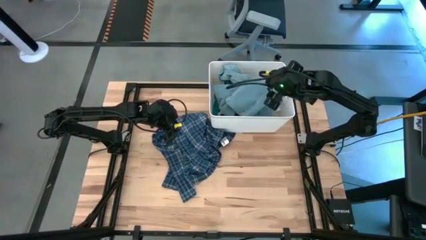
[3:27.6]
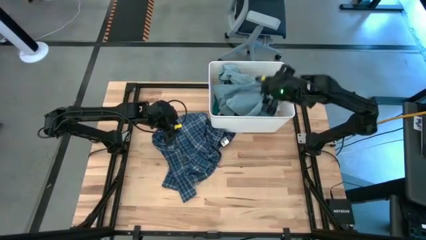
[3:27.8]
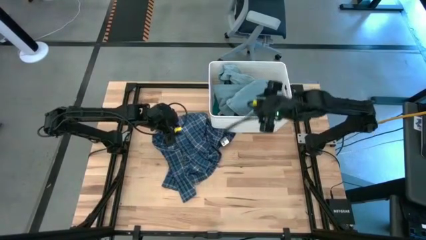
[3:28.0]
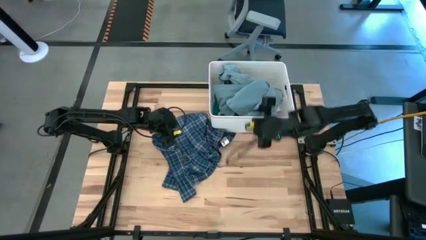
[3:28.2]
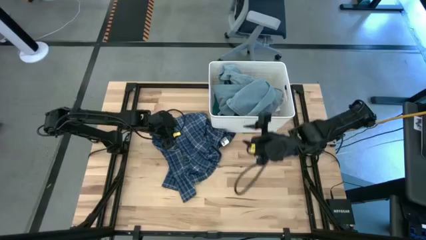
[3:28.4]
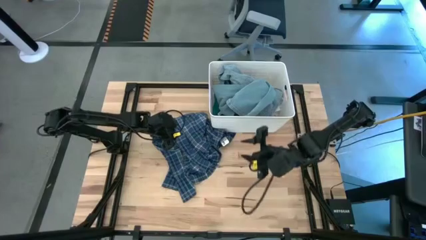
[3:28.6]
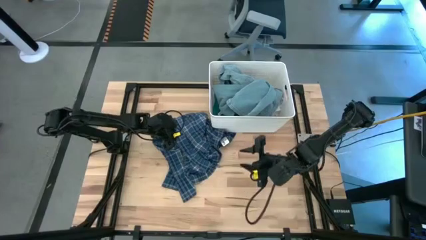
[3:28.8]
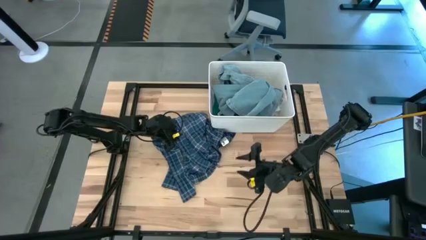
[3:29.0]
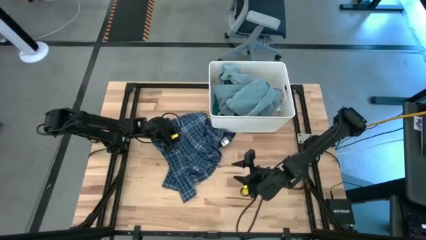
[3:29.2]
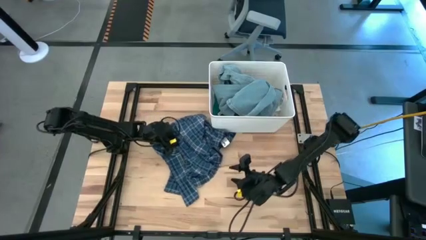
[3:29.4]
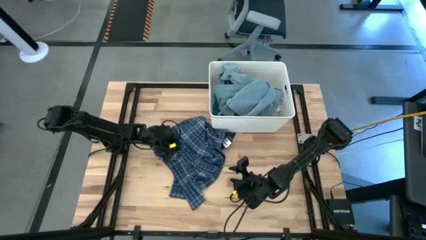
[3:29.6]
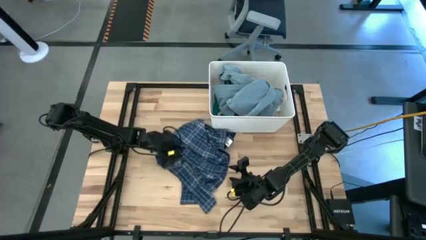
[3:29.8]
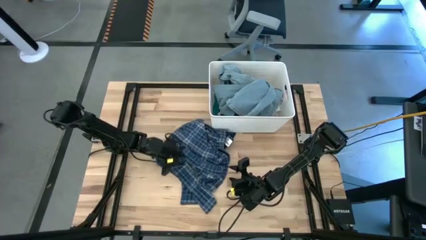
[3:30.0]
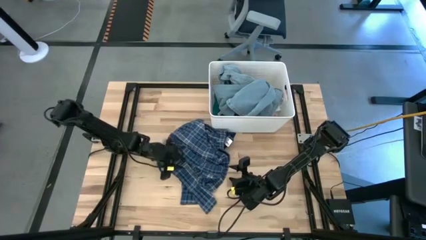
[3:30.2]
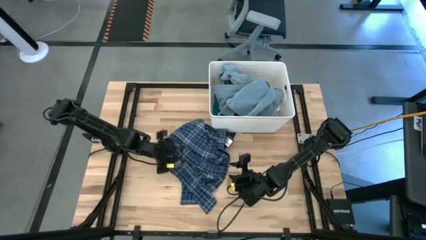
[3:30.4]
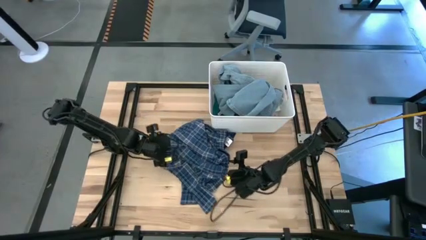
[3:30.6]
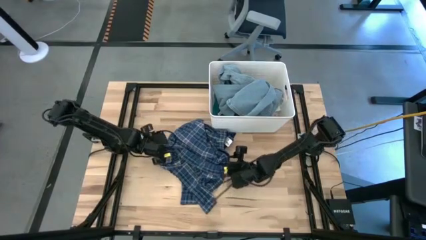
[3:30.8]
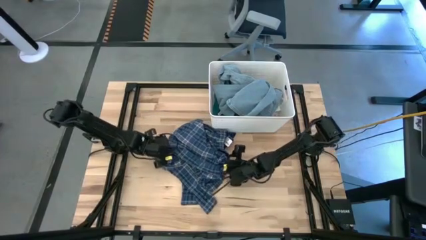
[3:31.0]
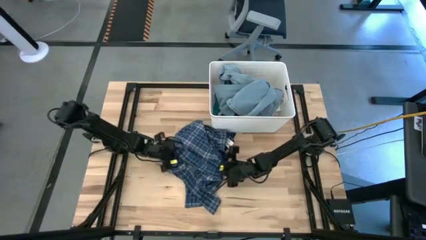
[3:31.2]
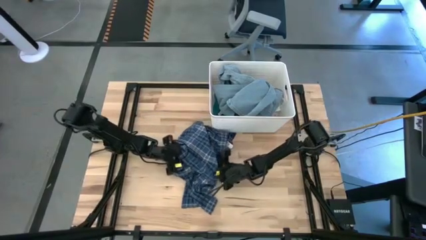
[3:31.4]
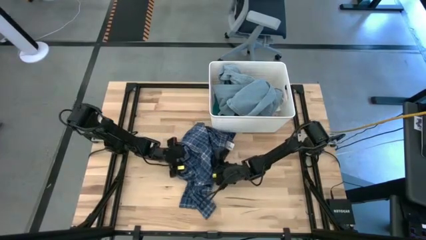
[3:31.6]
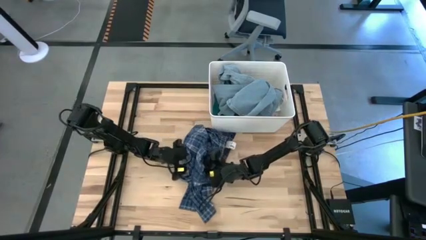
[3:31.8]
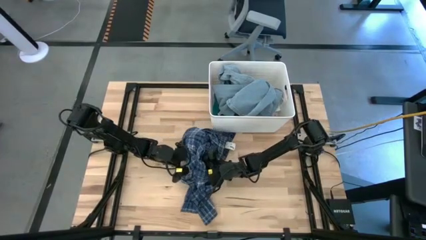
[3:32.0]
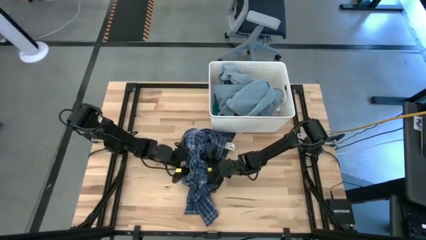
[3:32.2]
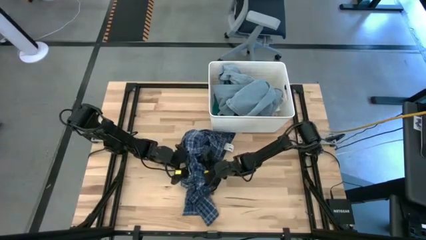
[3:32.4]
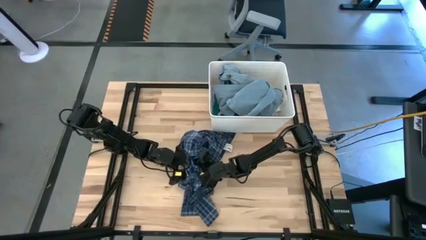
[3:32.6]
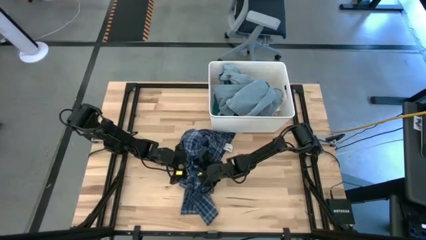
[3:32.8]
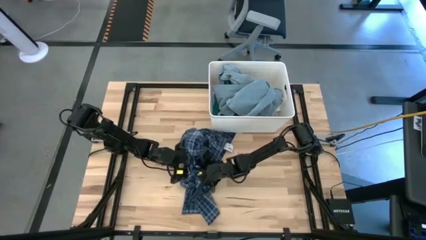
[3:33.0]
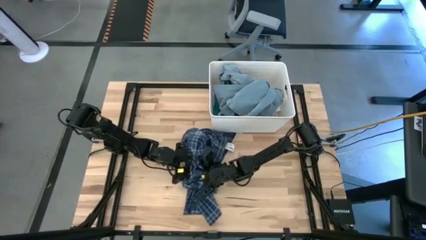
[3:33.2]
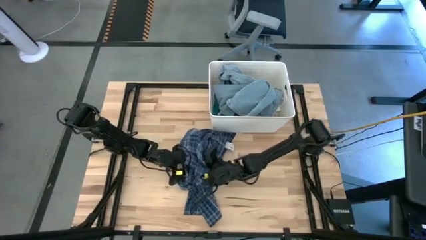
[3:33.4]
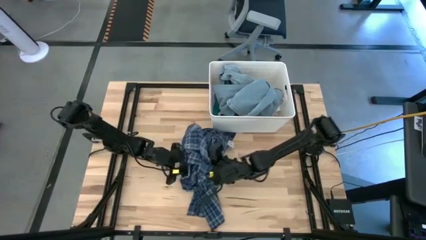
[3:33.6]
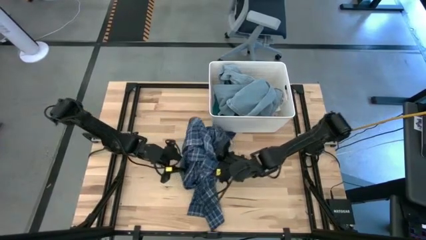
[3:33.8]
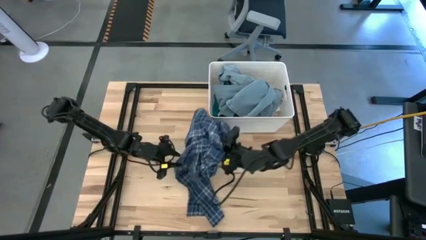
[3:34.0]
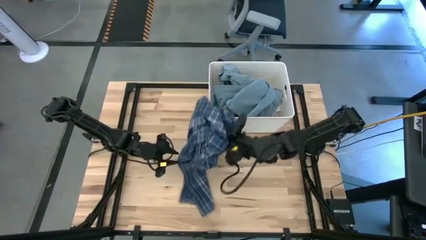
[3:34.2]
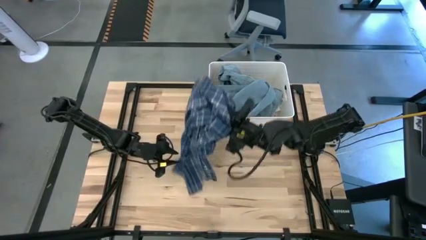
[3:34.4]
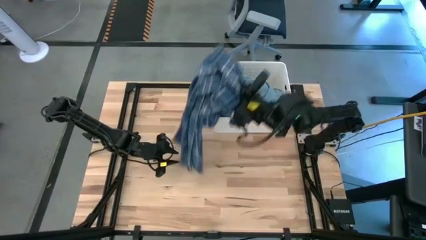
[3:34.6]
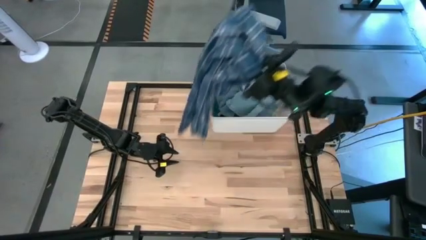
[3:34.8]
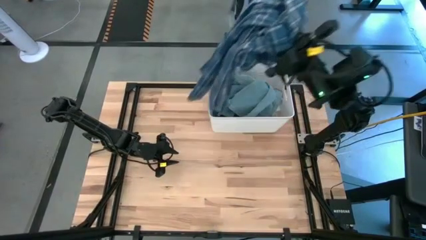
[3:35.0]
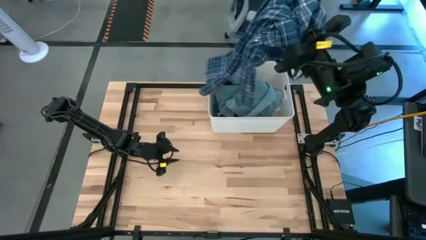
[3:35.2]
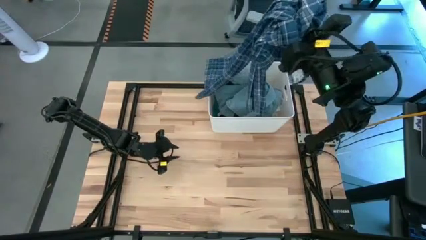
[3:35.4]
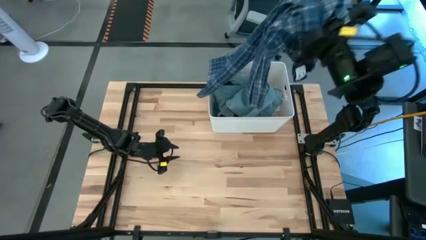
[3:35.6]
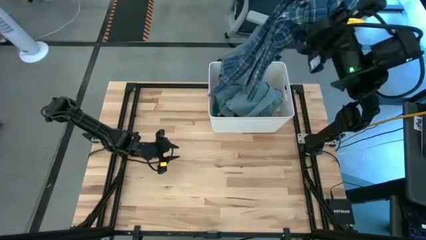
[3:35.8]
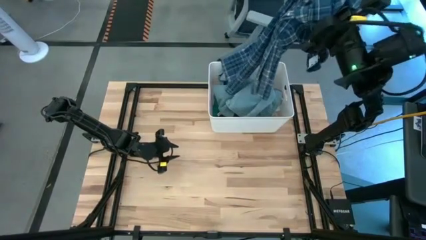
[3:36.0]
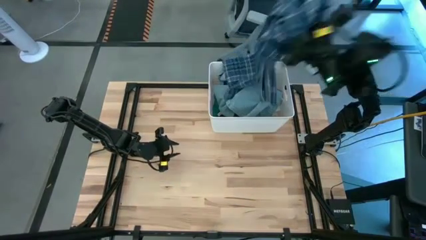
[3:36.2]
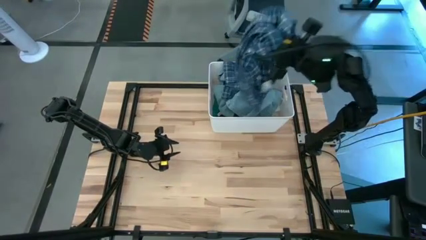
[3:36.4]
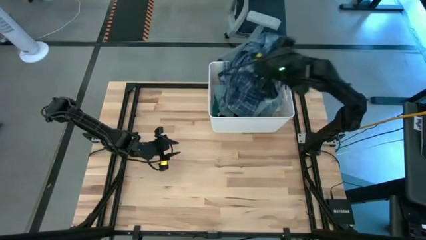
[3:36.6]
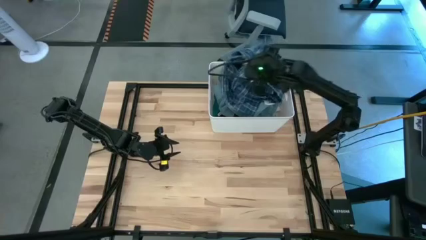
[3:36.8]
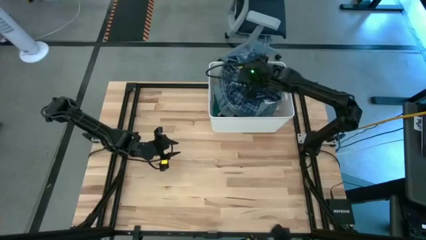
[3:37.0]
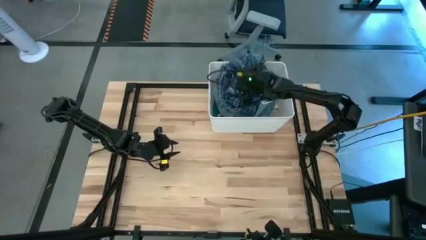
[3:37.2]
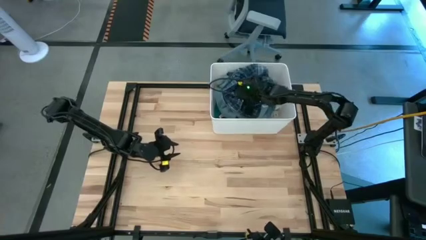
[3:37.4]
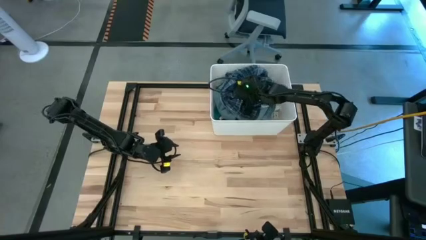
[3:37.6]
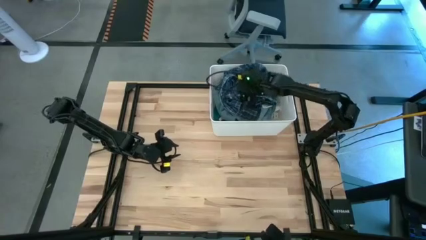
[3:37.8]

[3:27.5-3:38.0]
Task: Sort clothes
Put the blue polo shirt into the white laundry bin

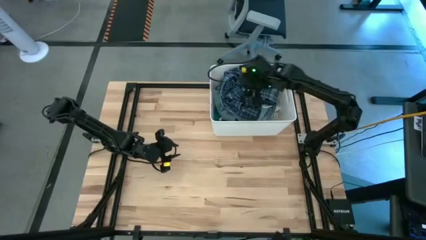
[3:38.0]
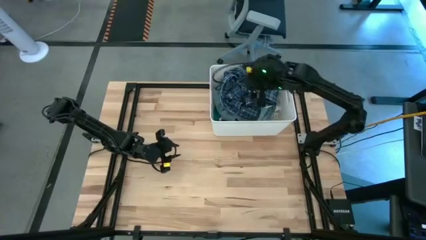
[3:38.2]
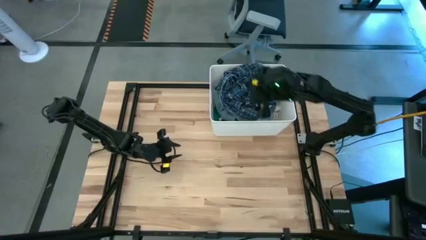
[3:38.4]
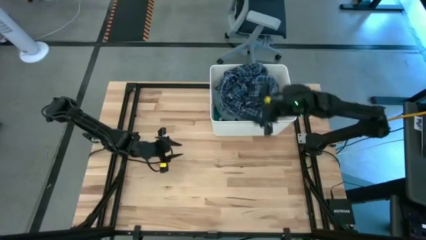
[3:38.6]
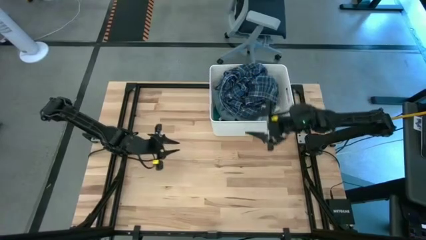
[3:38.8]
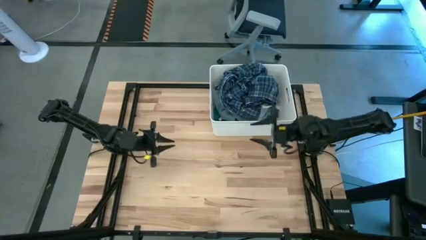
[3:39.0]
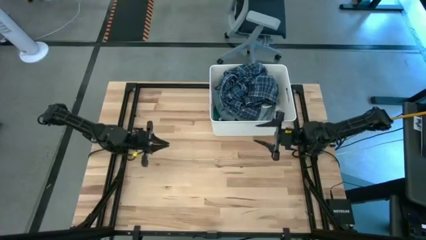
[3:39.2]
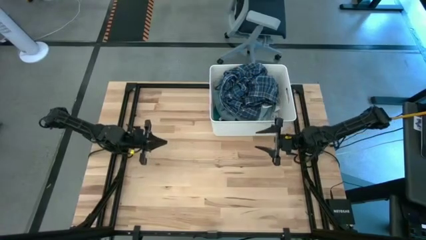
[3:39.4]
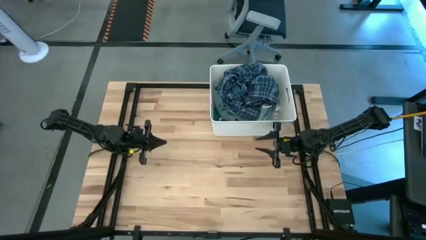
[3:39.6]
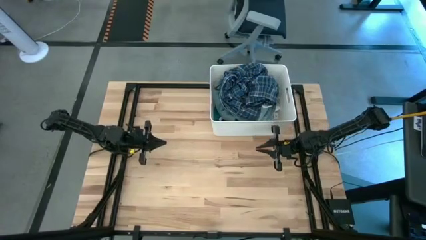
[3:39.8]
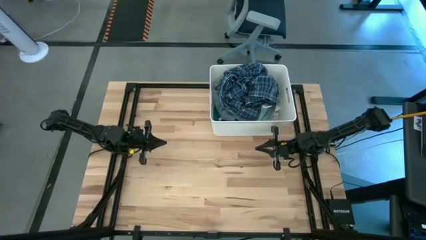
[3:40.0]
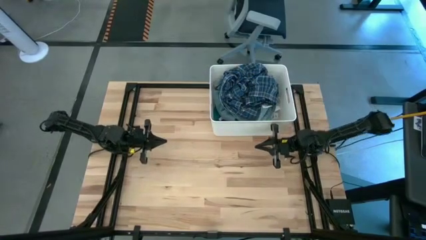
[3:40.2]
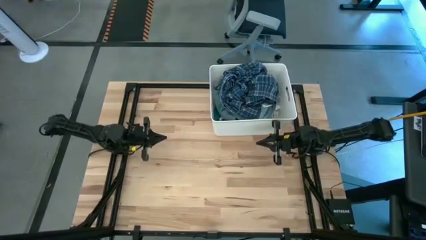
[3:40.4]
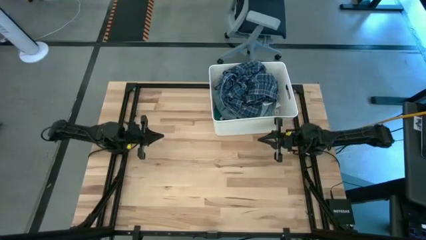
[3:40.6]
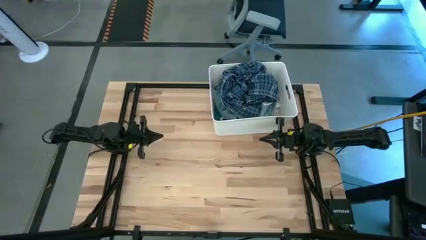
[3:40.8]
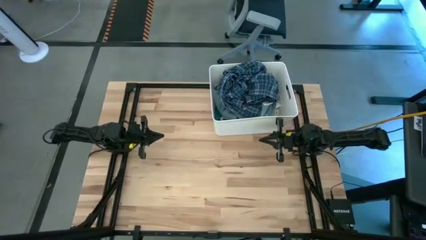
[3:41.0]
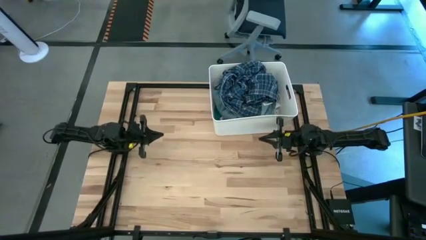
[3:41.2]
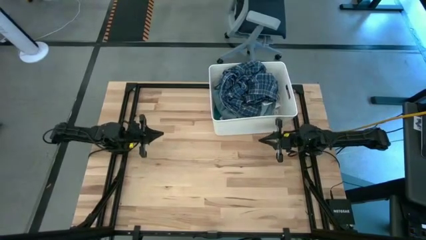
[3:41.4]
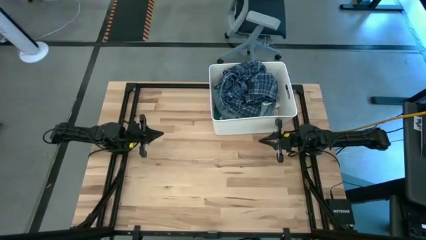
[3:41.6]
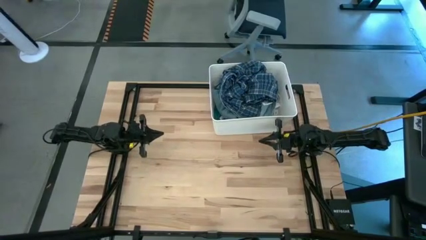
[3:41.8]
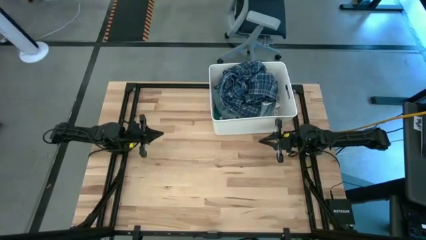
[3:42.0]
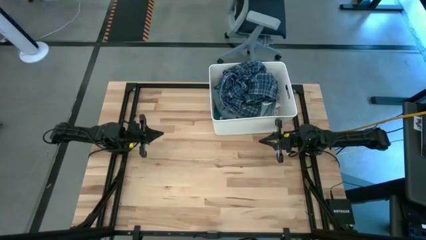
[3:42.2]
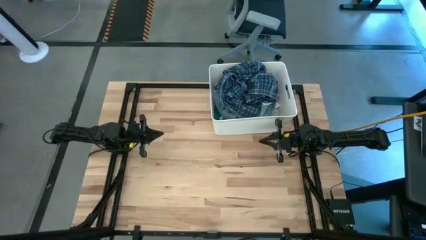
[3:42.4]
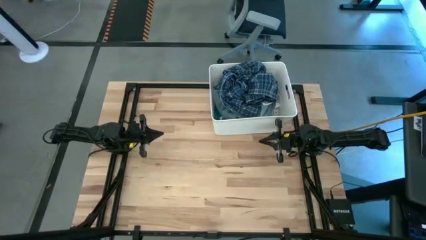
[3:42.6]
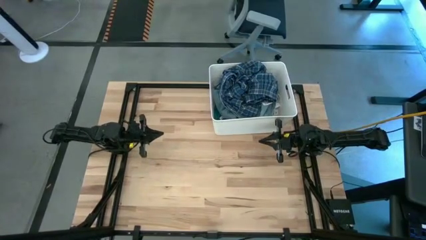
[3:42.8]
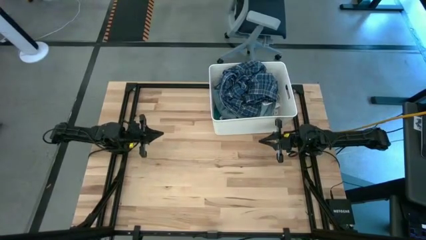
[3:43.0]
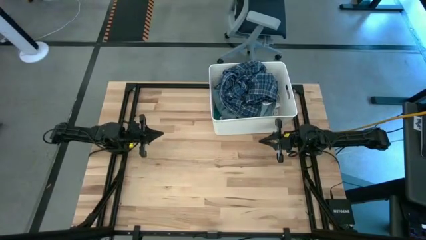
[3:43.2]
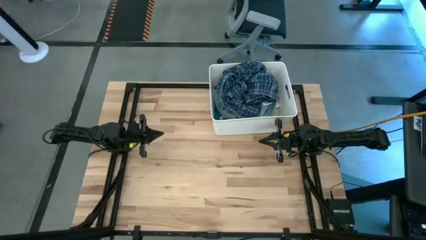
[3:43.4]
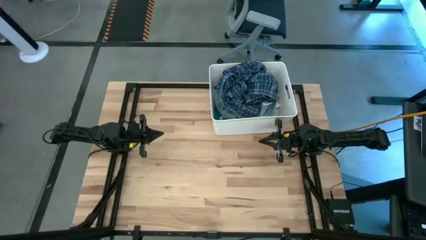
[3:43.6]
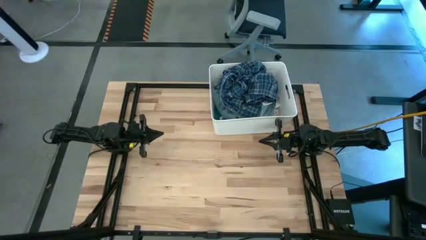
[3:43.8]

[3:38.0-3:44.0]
Return to Home Position
